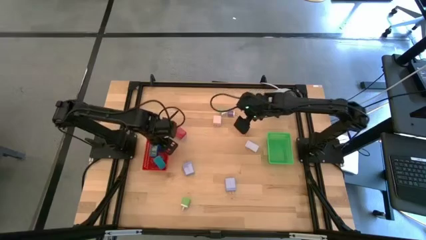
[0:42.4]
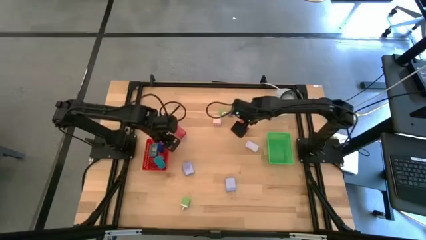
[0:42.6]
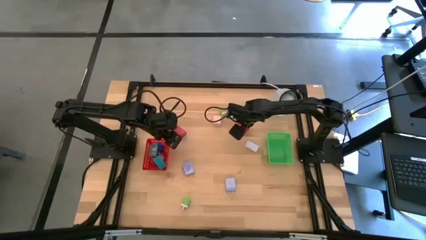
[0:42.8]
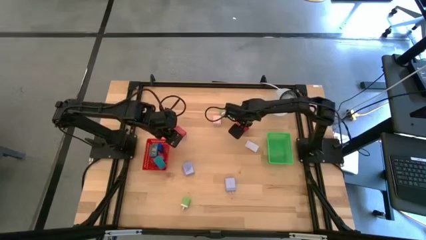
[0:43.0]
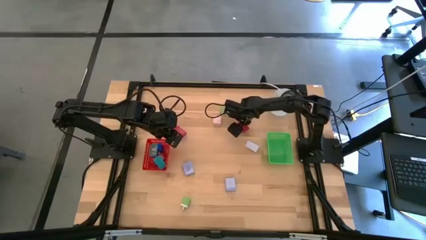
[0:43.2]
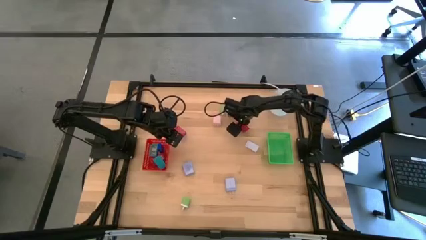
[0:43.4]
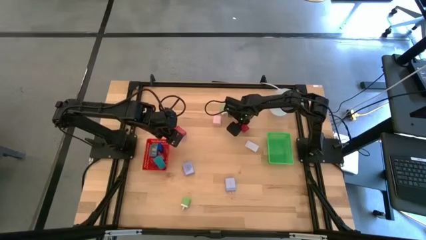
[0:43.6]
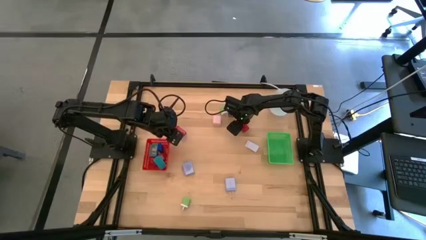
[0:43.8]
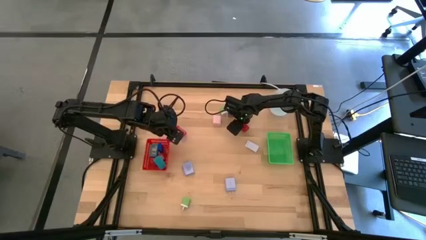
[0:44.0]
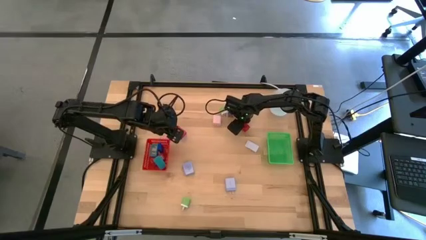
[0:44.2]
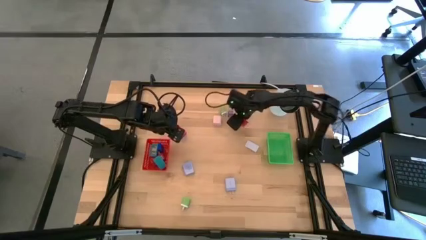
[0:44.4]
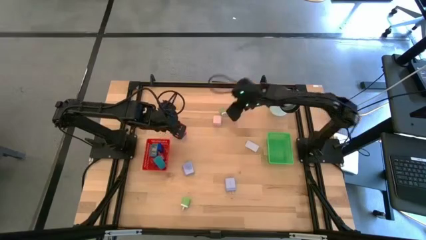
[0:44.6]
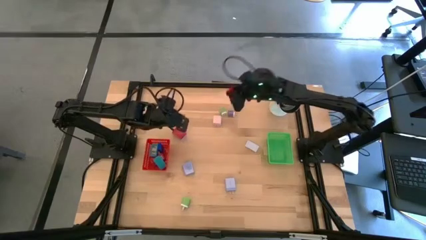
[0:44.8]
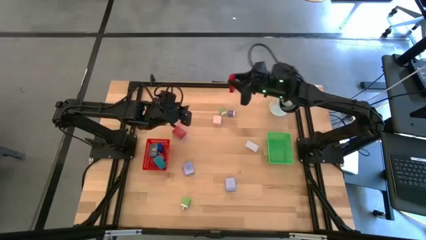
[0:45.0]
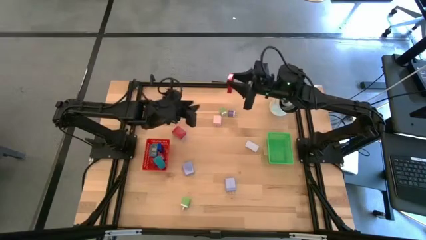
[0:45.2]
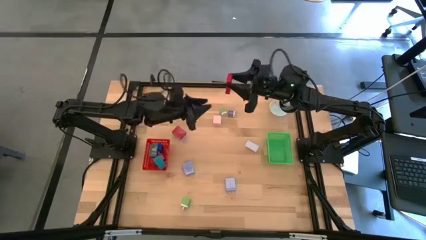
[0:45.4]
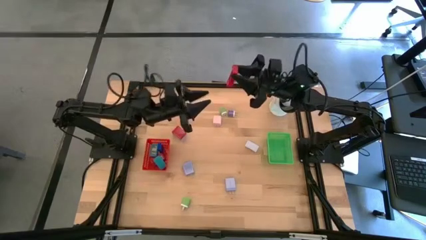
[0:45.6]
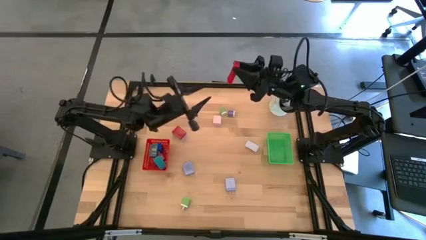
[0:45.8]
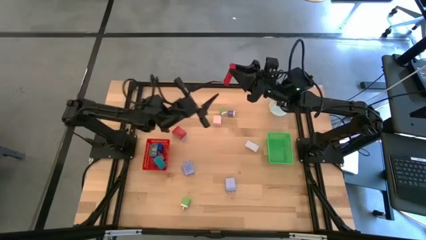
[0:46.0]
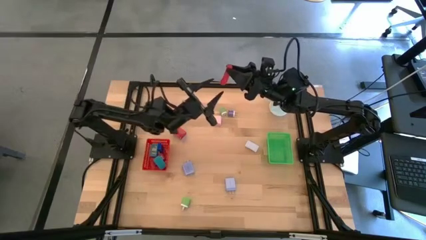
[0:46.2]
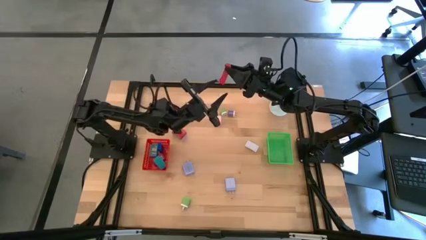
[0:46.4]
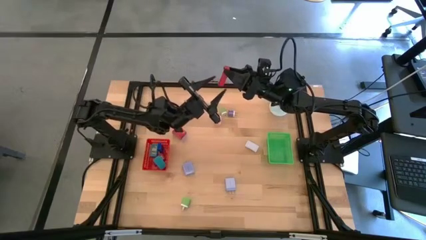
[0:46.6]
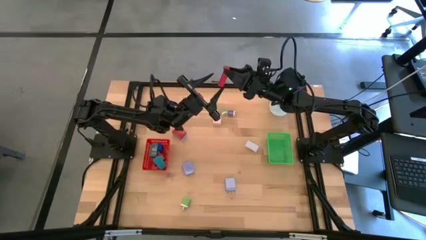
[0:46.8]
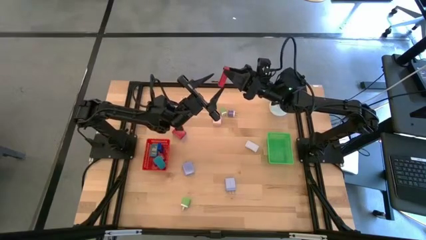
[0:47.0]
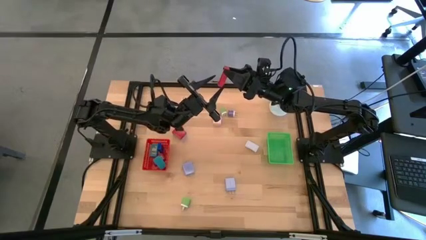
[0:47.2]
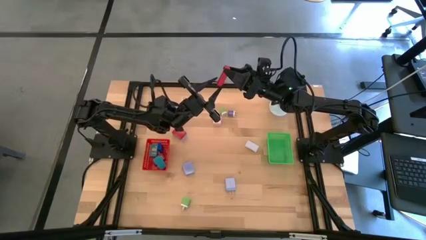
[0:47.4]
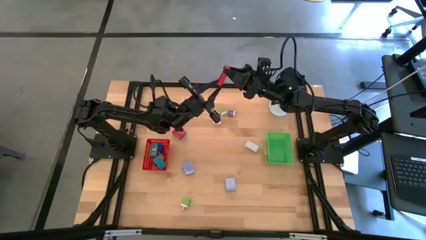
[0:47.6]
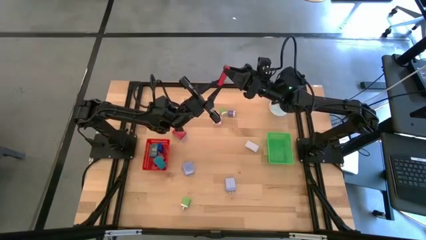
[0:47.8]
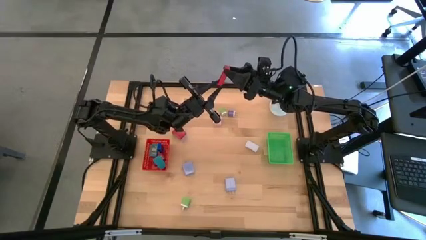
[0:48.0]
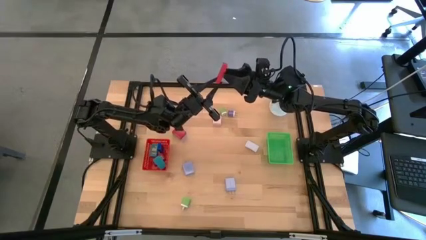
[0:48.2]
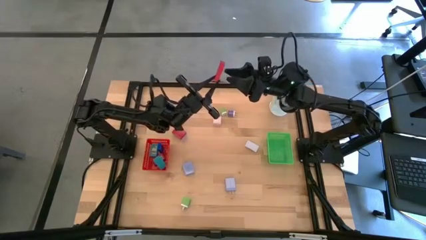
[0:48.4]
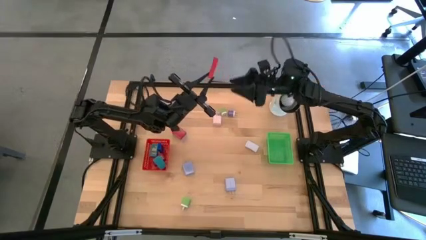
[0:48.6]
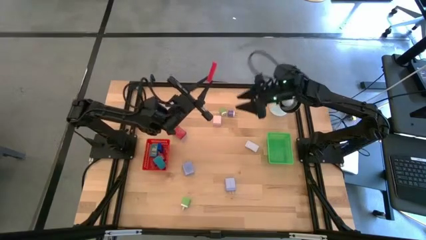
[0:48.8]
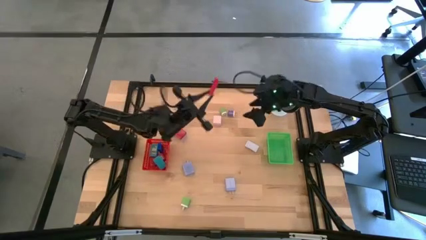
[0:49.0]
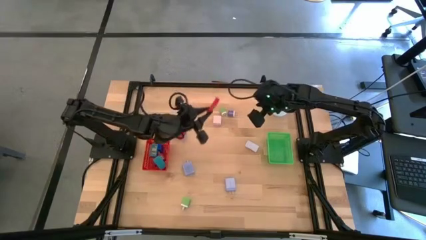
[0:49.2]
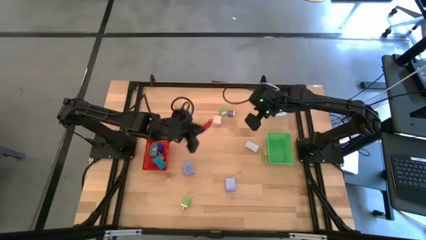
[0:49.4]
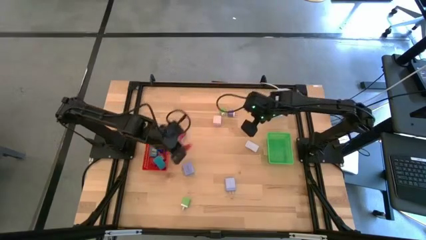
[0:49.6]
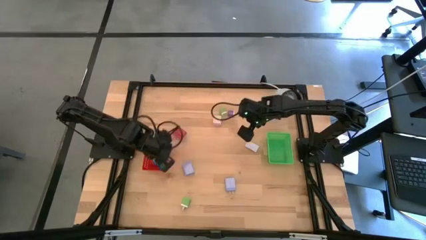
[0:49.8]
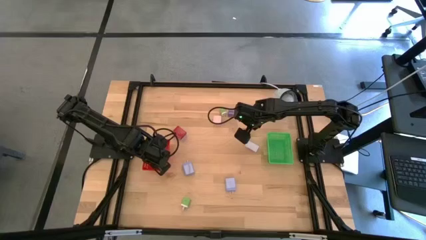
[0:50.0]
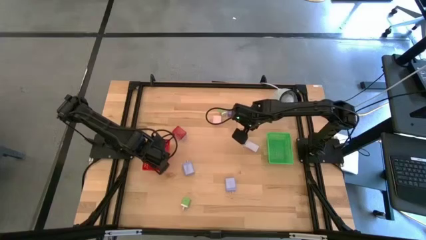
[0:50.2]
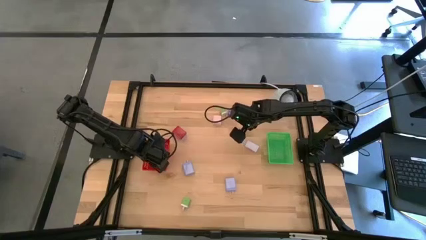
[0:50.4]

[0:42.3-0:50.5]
Task: Pick & Place Office items
Put the red digital timer into the orange basket

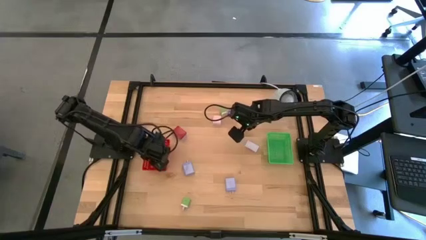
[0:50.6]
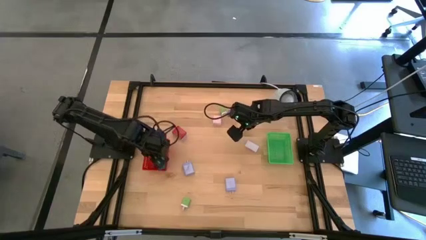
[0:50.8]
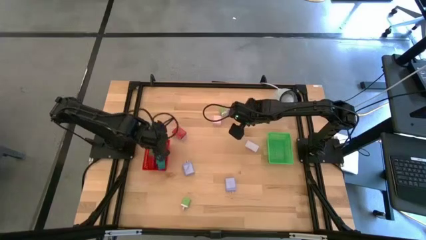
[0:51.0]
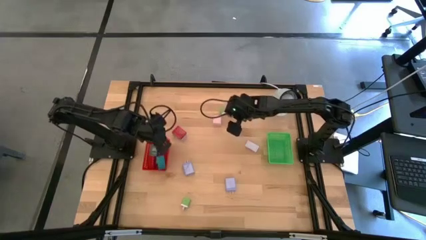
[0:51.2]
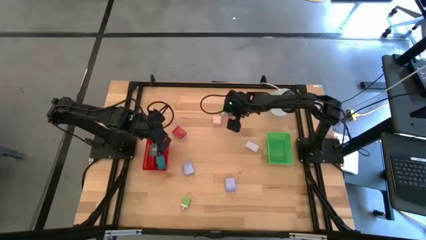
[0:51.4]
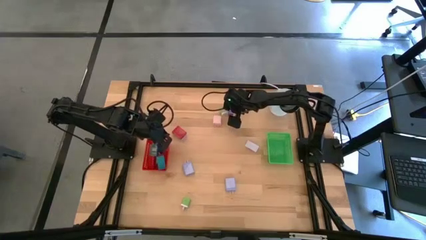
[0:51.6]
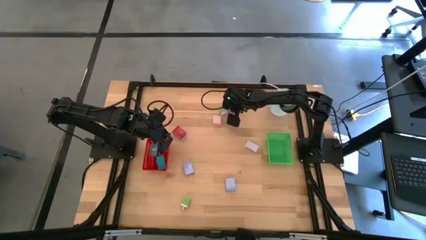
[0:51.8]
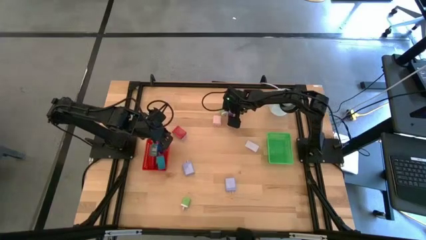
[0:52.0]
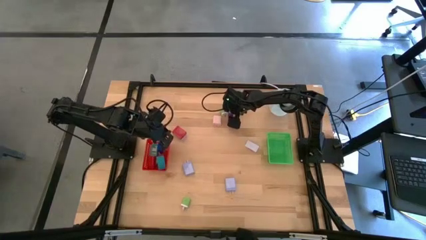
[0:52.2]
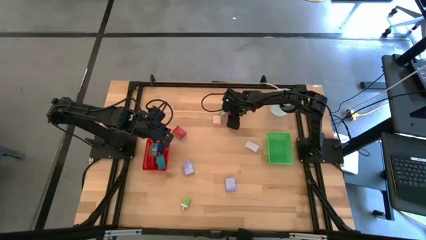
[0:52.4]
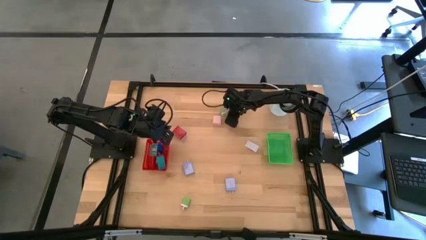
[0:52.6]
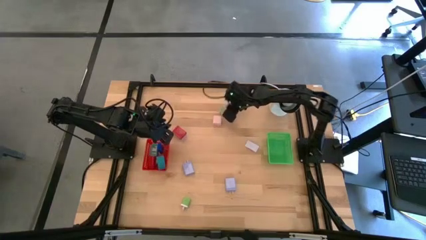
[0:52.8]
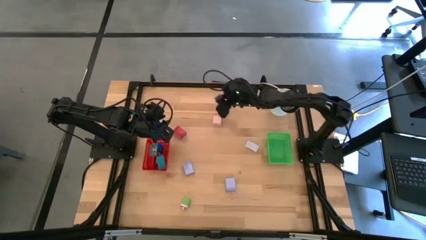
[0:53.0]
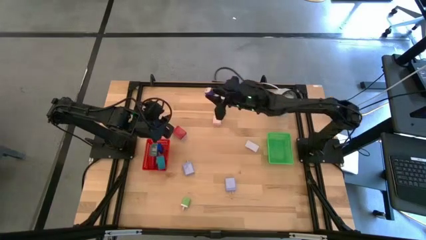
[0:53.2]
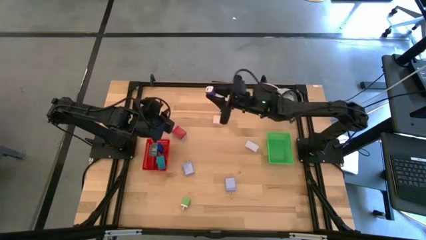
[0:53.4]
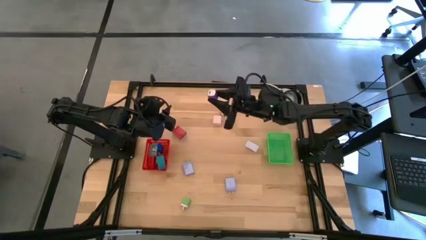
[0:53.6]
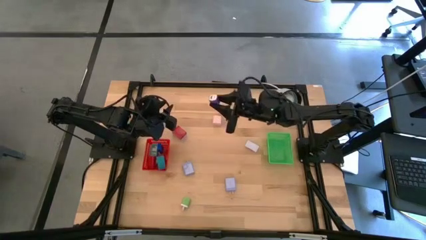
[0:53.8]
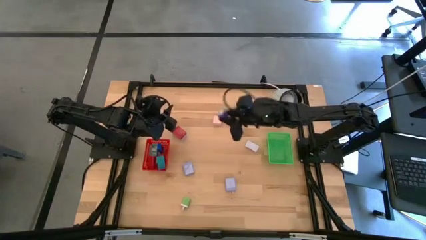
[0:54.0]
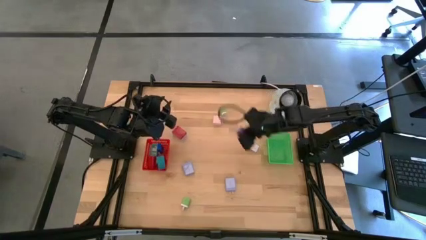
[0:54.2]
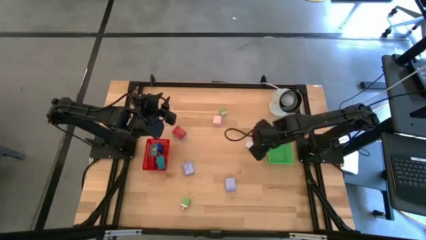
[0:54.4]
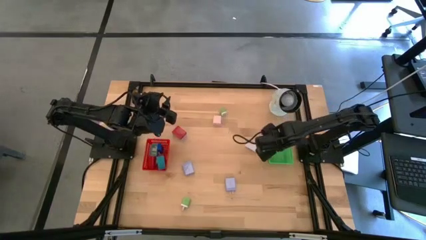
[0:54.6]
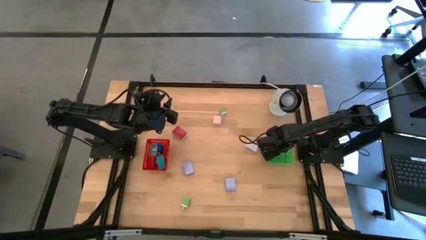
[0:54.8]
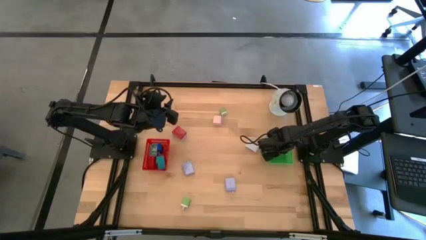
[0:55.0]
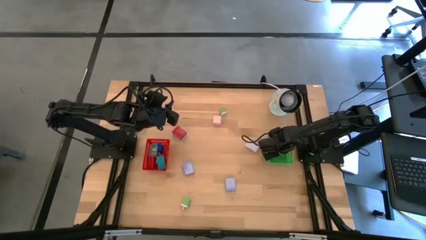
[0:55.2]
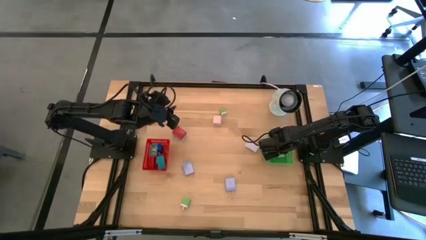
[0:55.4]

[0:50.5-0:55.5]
Put the blue charger adapter into the green basket

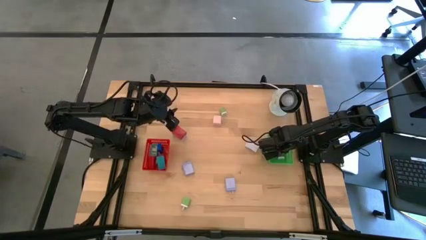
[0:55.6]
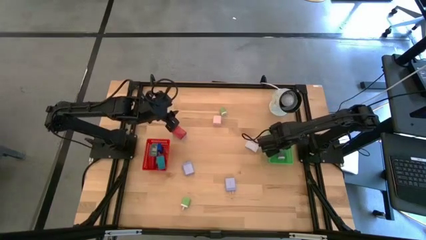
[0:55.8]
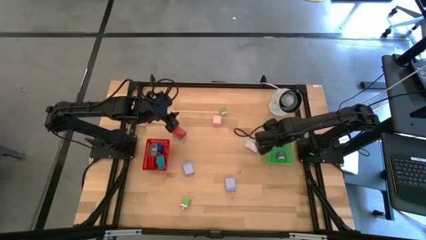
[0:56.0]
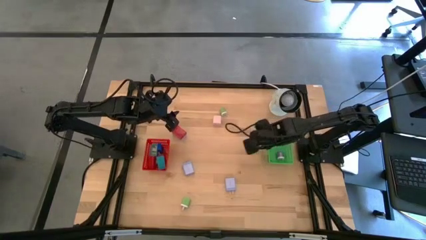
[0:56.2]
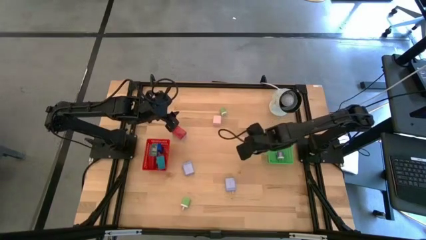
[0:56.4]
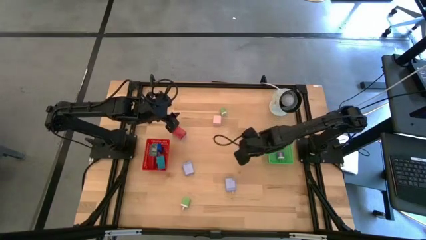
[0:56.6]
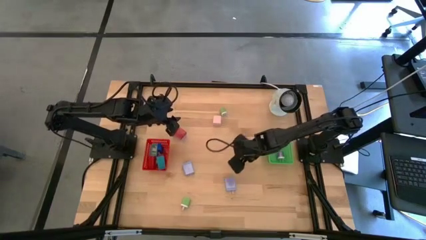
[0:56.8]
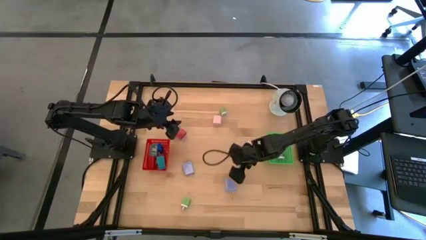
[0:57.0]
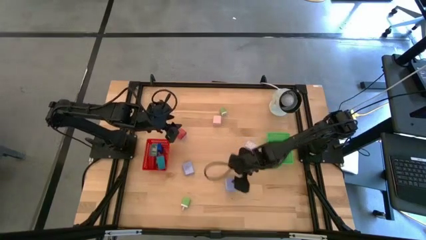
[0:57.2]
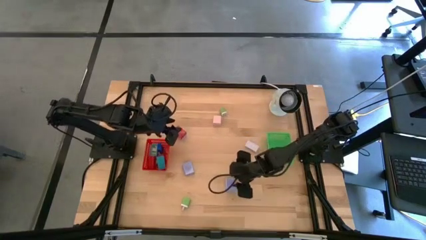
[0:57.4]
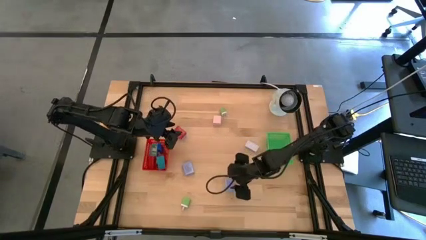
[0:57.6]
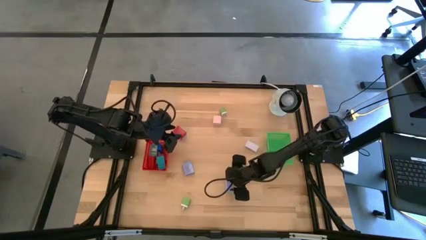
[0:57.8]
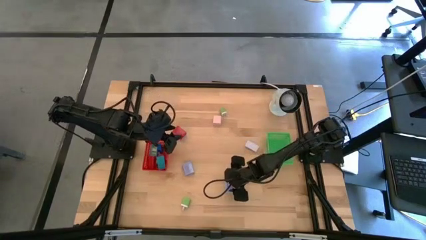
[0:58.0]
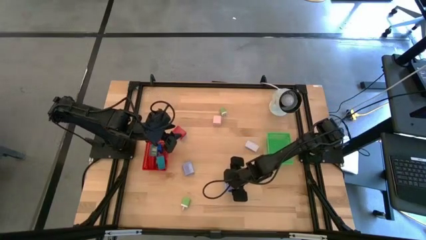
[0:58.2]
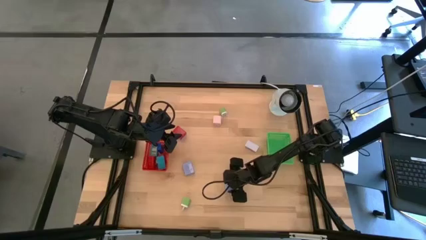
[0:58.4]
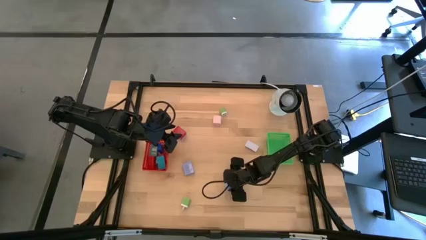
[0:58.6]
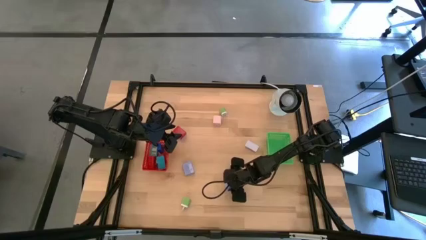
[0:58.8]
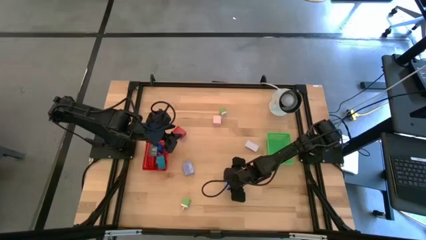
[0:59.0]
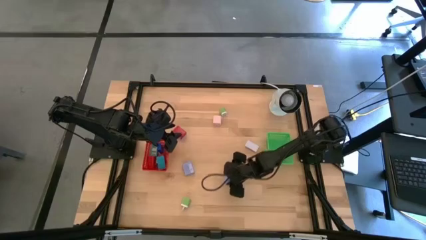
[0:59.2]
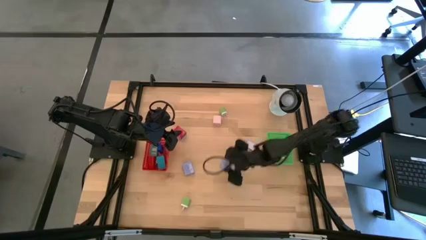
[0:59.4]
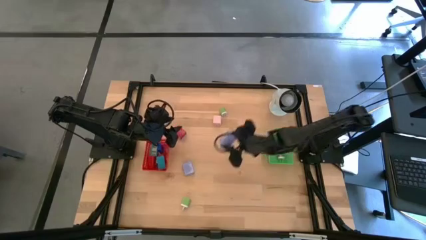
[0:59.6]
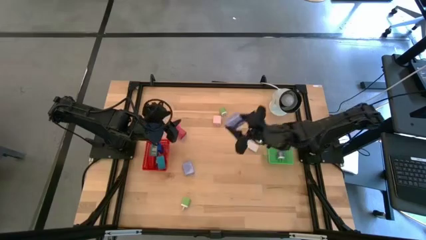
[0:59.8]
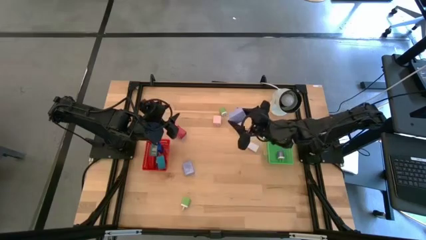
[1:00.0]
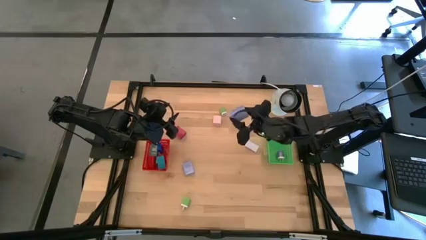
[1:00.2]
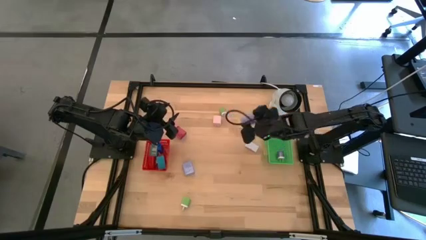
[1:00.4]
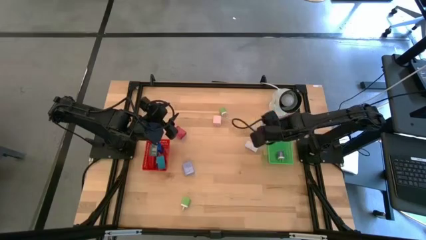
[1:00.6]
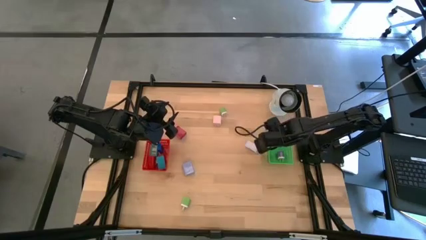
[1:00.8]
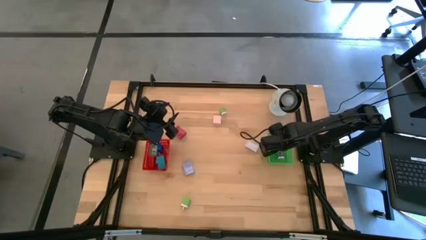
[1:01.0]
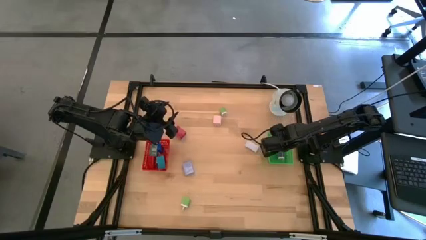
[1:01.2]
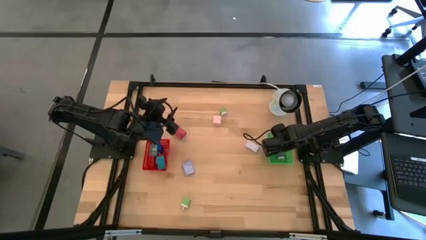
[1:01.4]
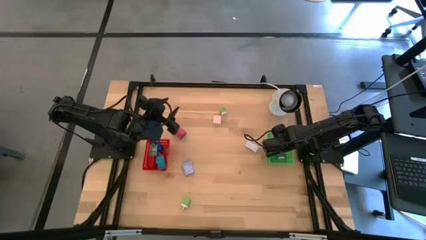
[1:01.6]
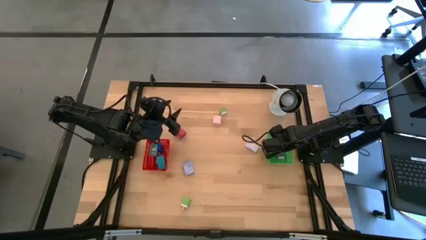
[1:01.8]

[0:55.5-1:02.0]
Put the right light blue charger adapter into the green basket
